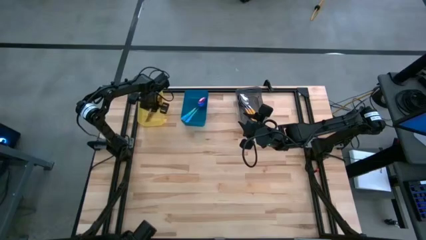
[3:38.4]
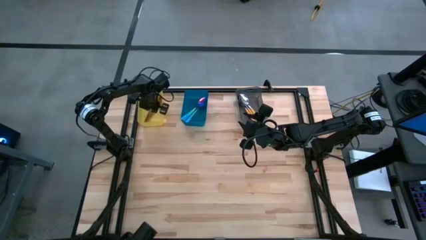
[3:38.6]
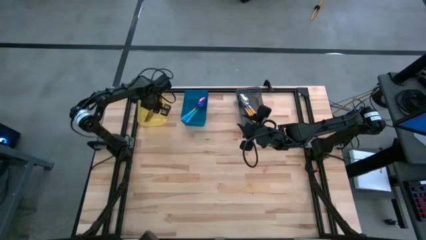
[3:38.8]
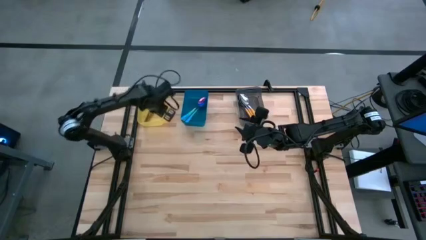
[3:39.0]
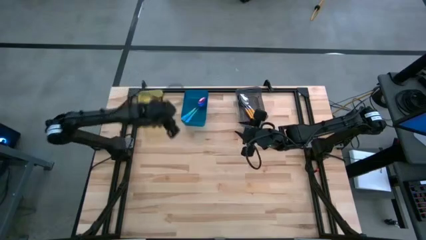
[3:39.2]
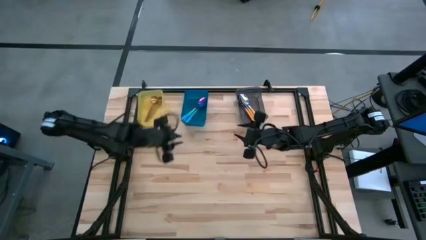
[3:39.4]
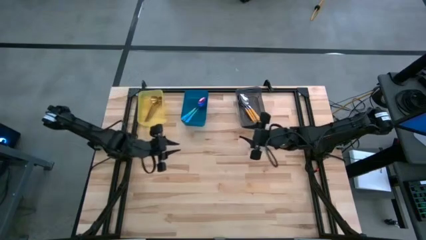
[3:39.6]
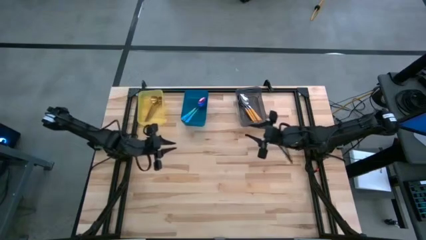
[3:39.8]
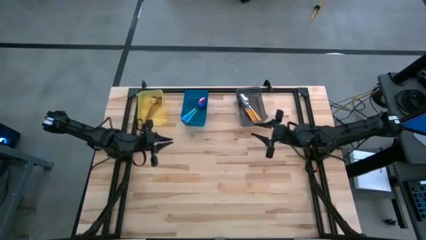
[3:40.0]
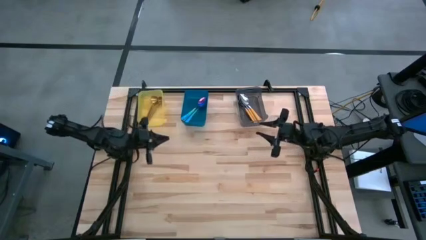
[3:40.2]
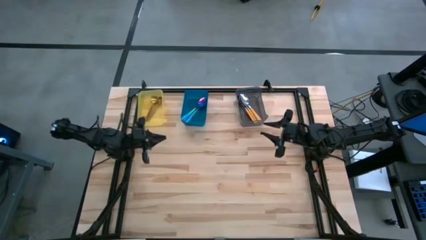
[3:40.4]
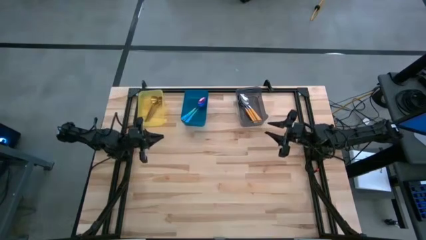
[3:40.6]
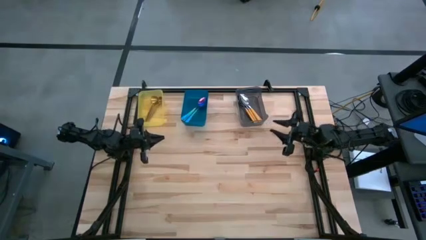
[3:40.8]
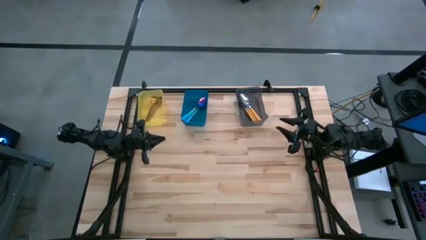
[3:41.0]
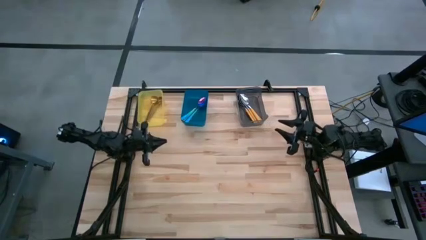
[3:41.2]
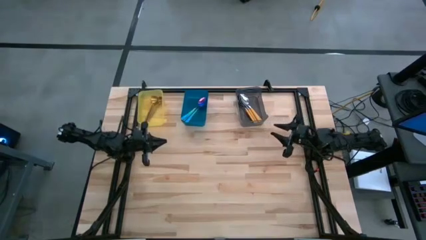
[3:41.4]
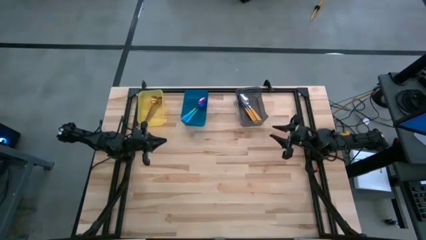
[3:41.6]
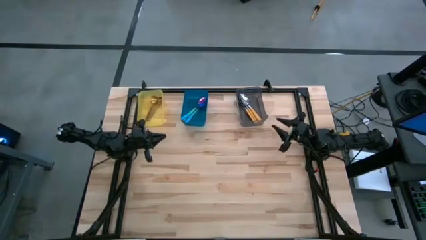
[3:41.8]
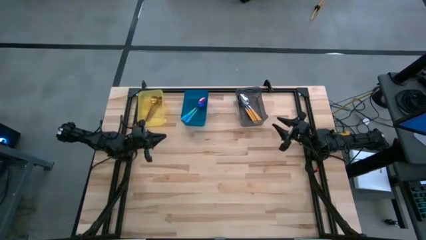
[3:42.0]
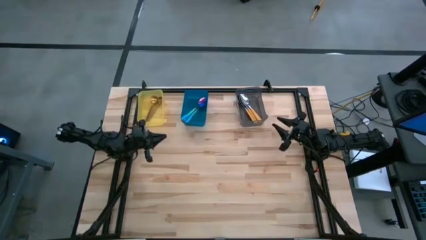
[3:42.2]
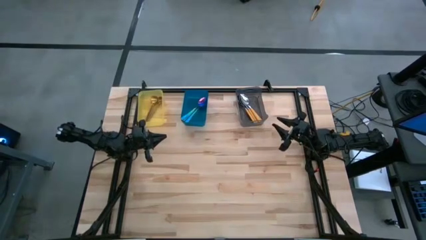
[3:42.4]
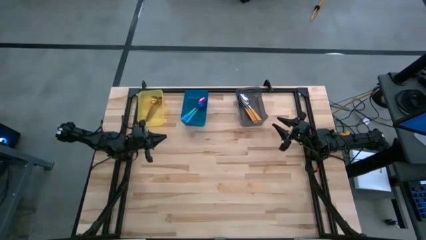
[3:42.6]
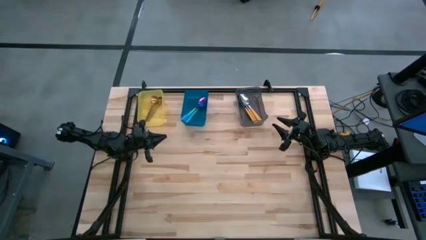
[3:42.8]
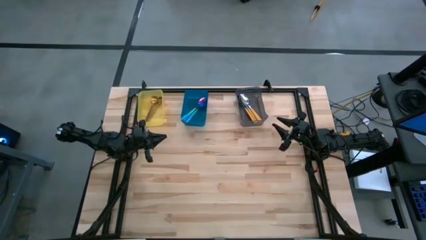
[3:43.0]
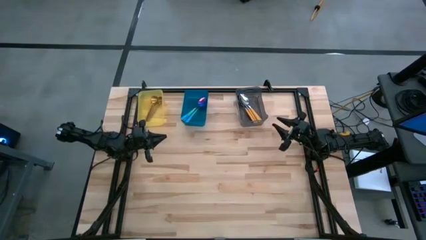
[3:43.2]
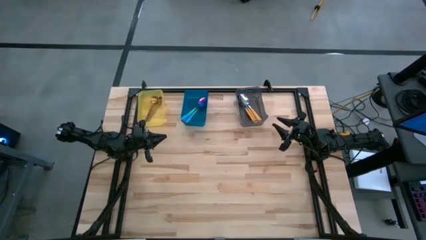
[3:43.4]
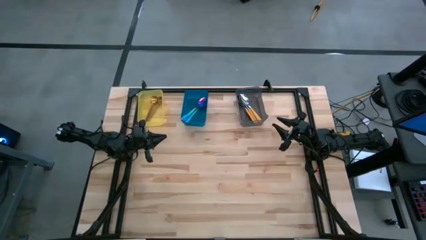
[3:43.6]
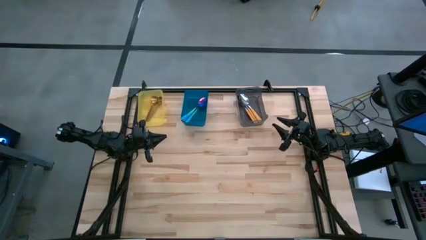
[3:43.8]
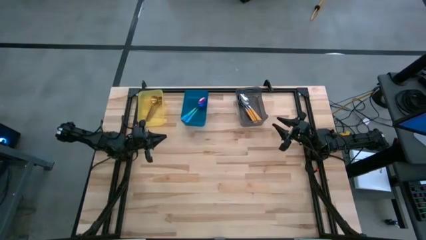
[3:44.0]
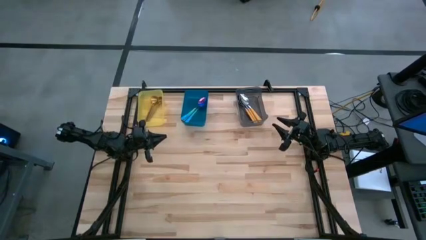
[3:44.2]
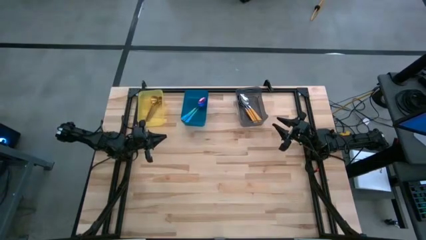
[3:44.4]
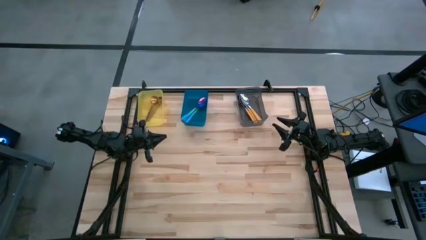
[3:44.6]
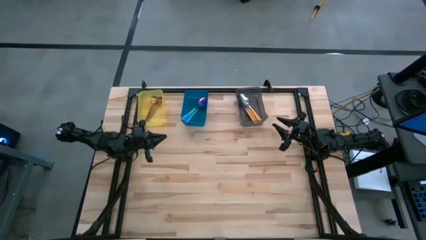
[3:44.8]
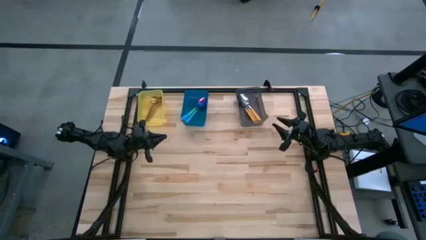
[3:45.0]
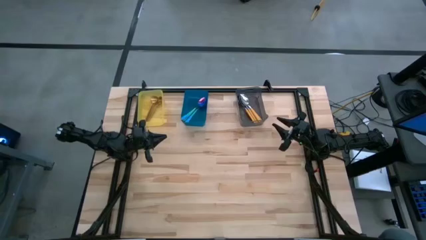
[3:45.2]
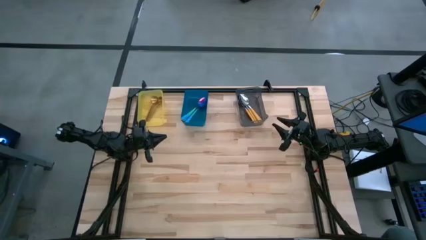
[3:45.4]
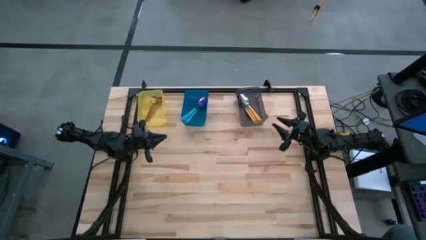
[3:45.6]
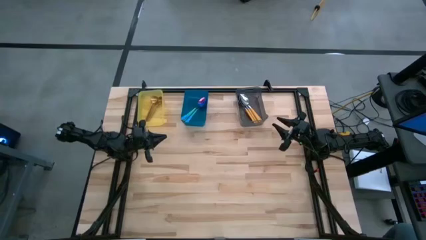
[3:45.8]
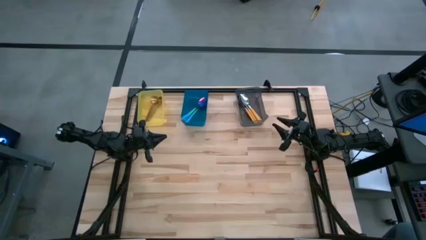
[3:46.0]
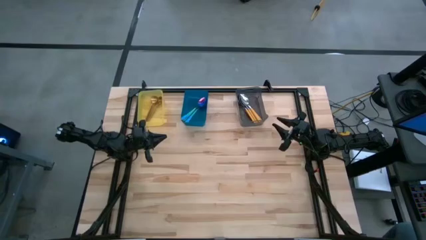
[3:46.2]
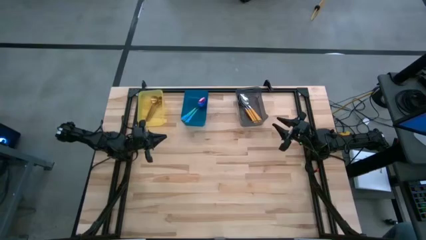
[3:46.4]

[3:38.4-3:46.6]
Task: Sort silverware by color (type)
Return to Home Position

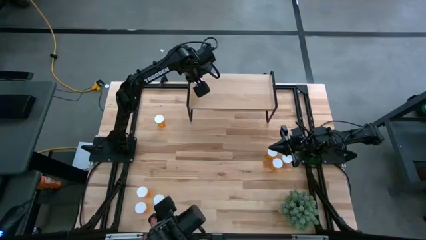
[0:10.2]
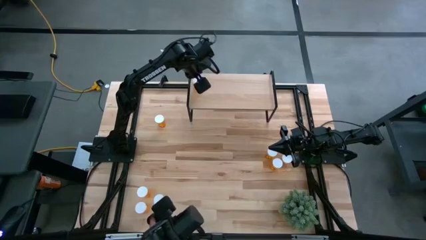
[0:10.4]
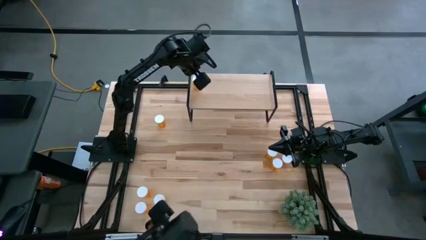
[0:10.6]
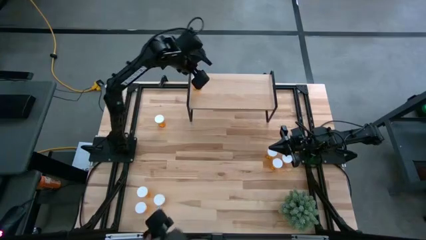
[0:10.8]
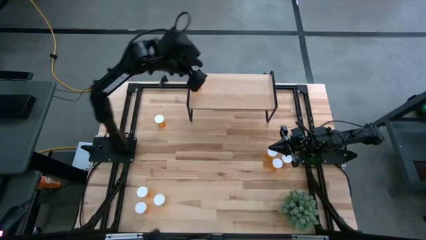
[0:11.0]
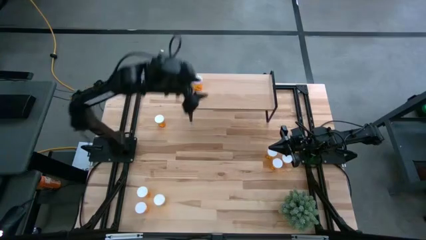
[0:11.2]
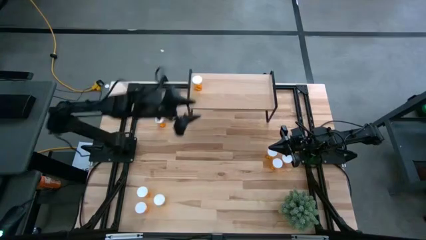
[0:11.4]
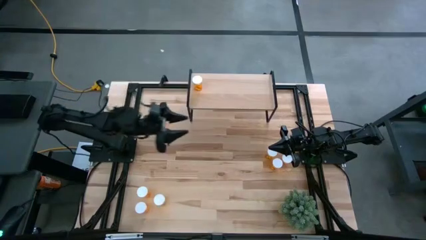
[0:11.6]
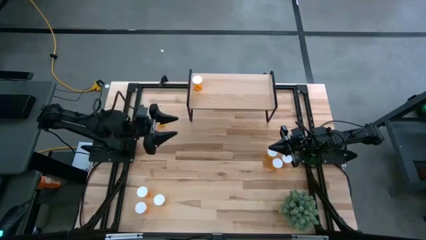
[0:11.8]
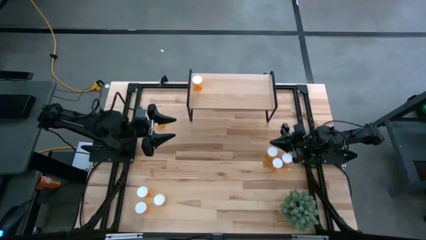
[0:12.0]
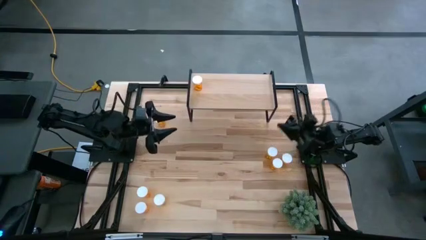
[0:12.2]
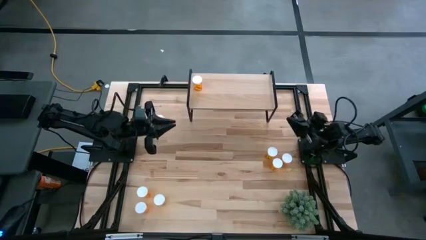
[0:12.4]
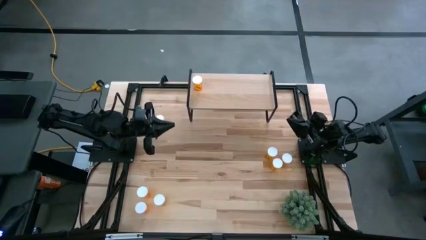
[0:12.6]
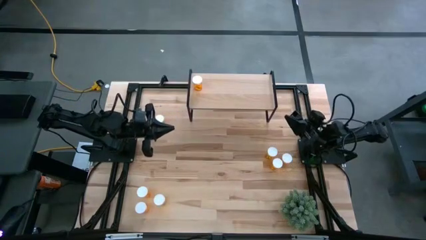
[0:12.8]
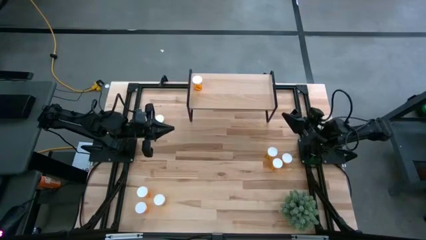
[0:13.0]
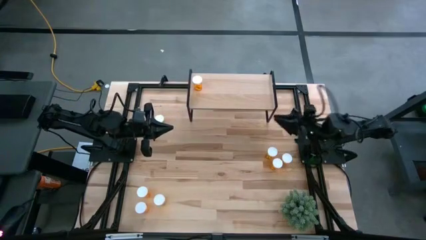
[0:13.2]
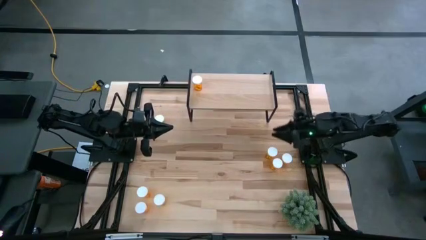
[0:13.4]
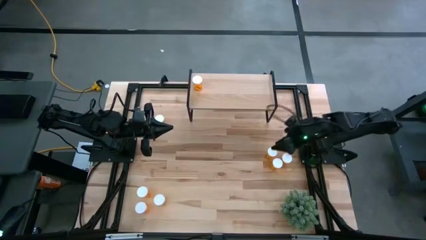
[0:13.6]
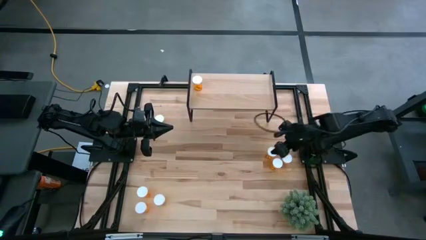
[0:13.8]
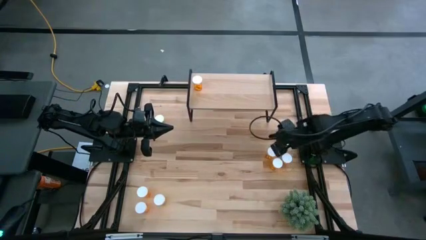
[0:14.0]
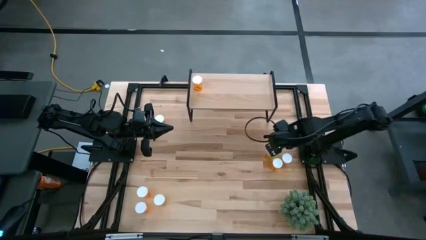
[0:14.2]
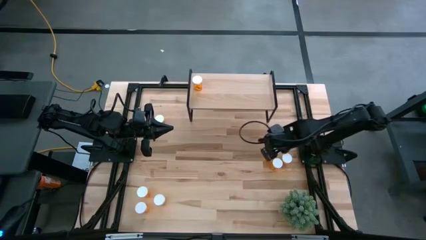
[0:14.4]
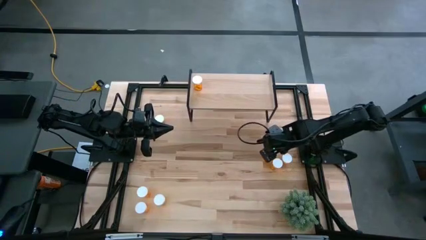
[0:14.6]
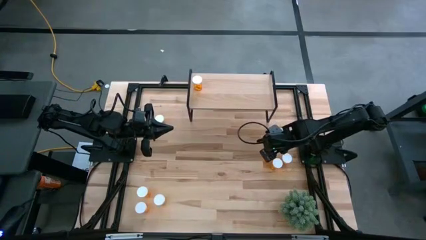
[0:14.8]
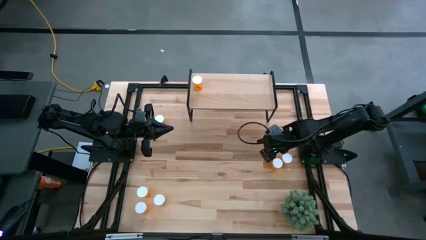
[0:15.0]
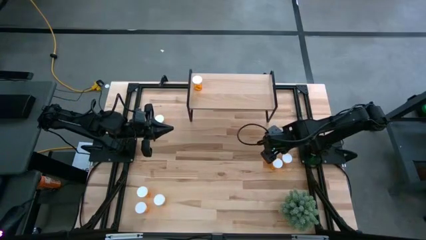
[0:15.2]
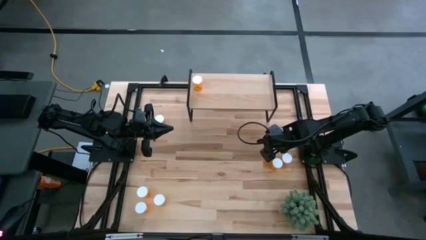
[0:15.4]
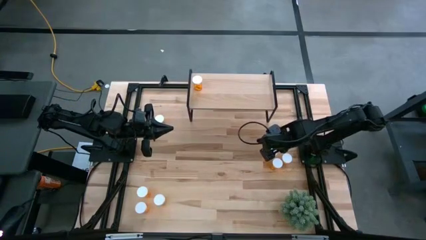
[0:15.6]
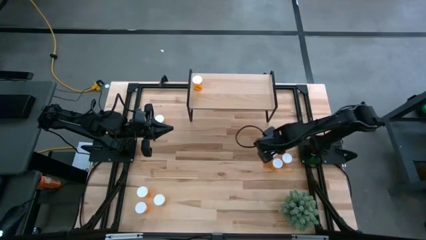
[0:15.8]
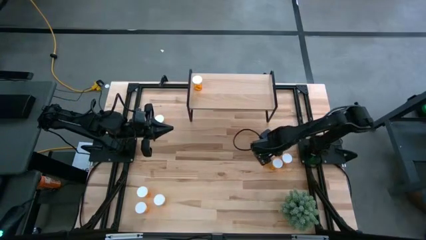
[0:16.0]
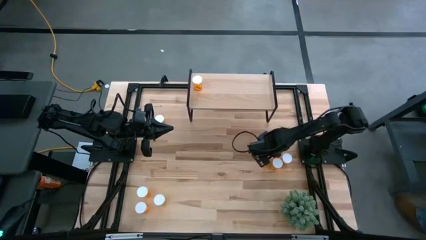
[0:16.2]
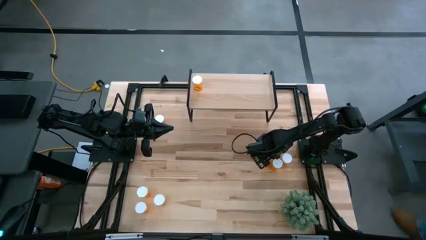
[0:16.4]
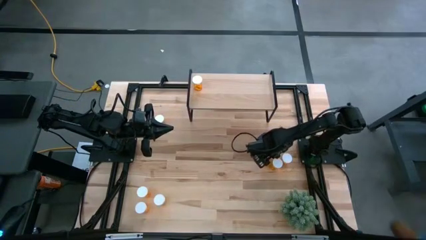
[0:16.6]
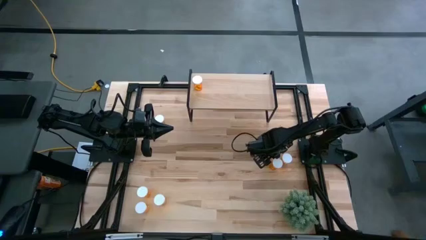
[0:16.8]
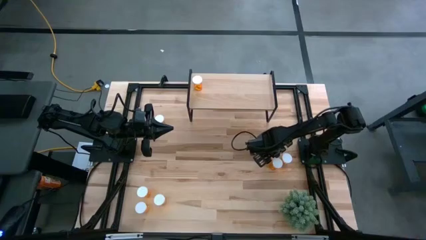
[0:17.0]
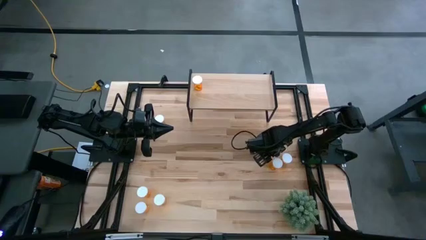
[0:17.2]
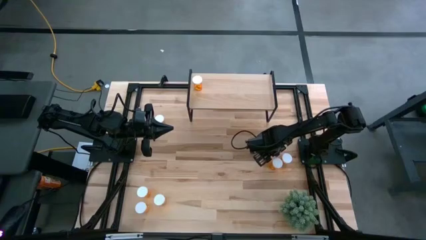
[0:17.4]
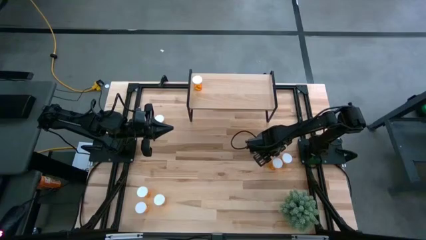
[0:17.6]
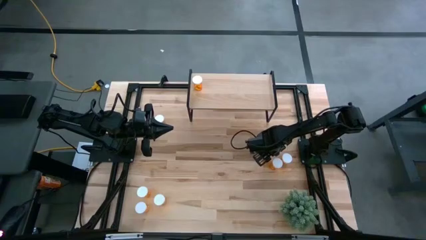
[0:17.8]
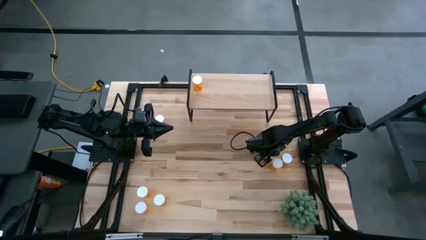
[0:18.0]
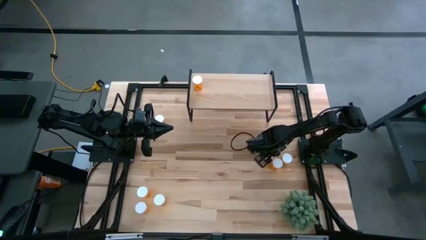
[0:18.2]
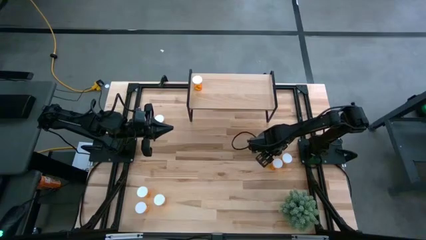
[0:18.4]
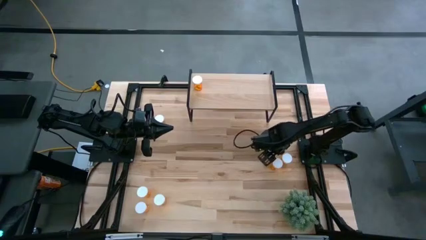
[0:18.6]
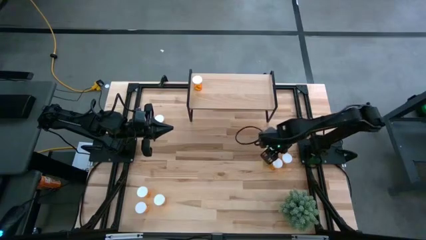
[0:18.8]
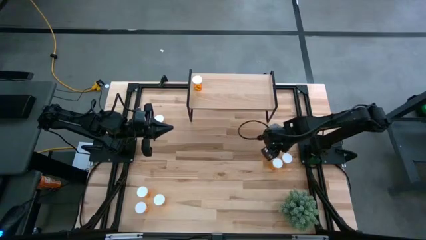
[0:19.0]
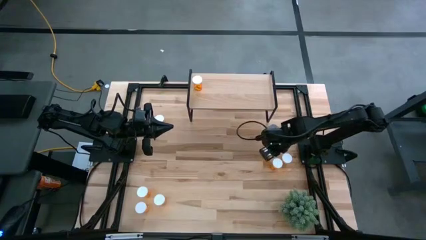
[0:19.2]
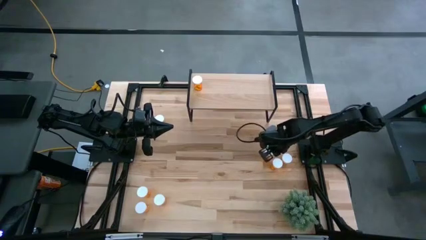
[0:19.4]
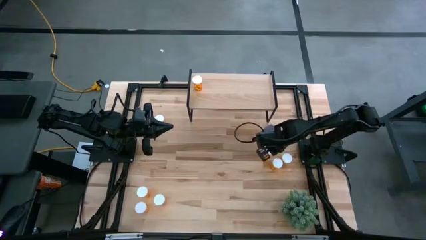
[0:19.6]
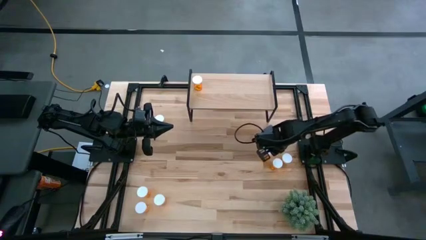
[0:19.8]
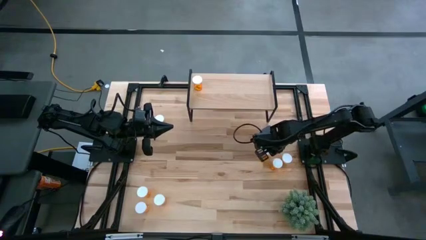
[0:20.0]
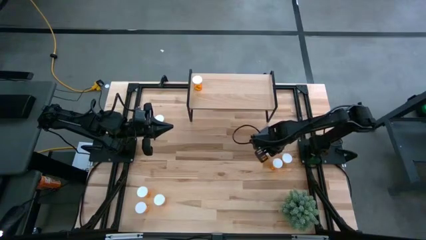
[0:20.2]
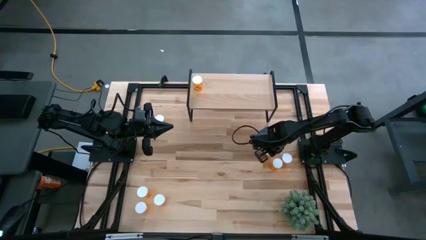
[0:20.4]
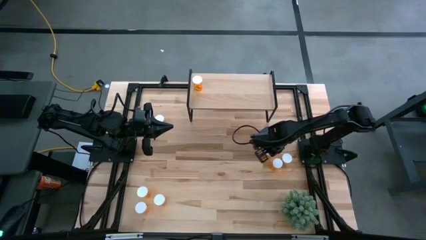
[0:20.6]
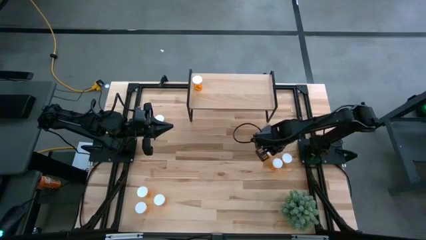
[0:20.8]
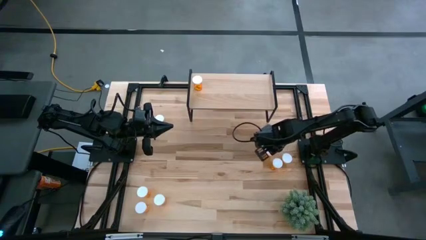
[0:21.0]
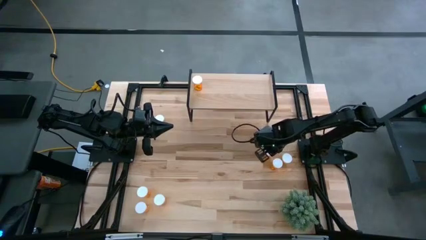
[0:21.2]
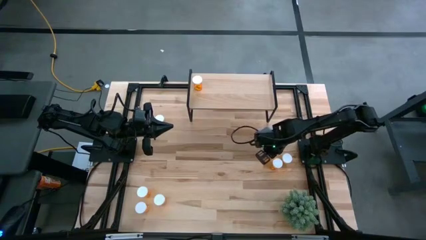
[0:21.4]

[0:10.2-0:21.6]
Task: Pick and place medicine bottles onto shelf by color
Put the orange pill bottle on the shelf aligned with the other orange pill bottle
